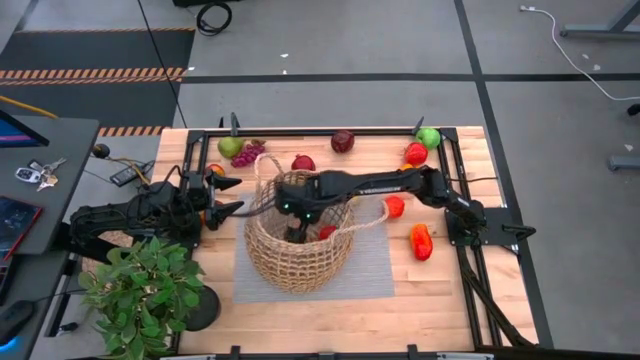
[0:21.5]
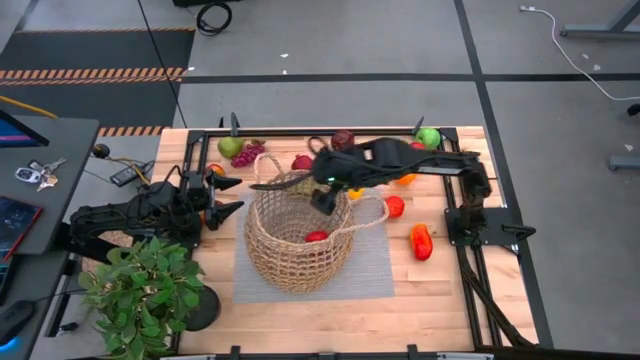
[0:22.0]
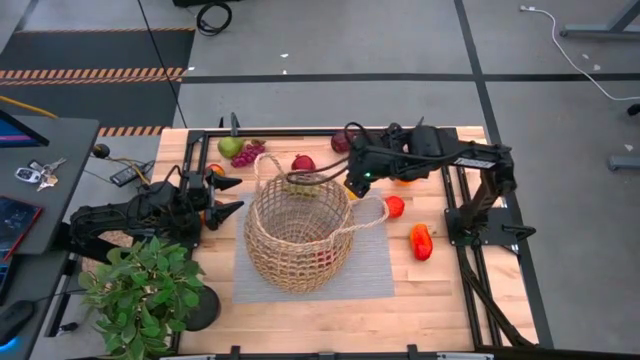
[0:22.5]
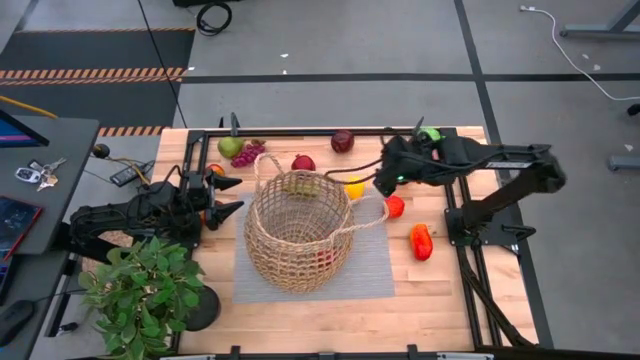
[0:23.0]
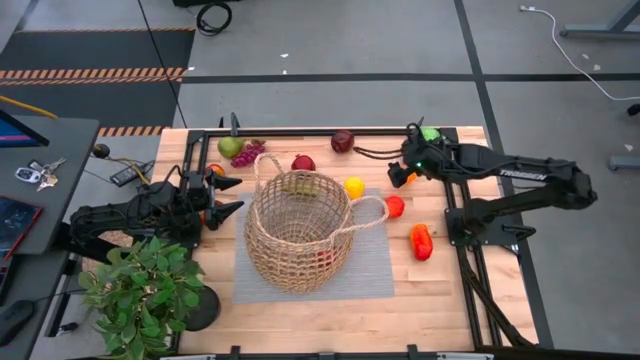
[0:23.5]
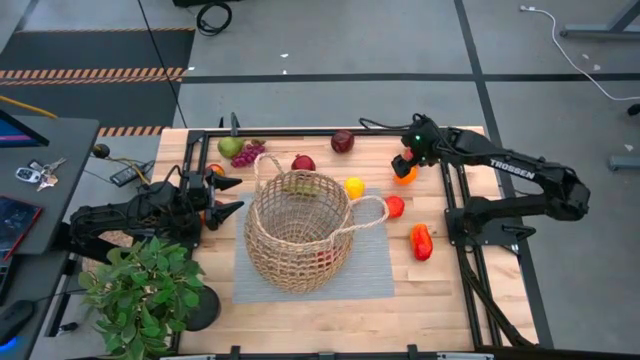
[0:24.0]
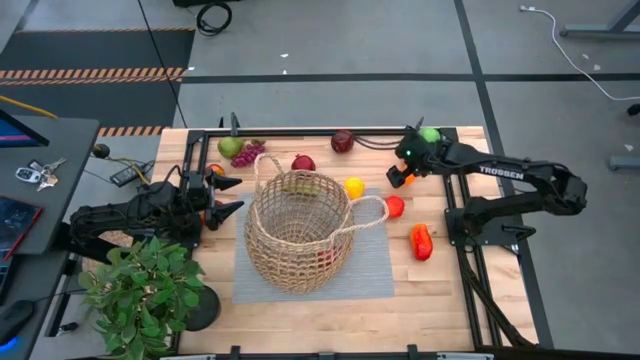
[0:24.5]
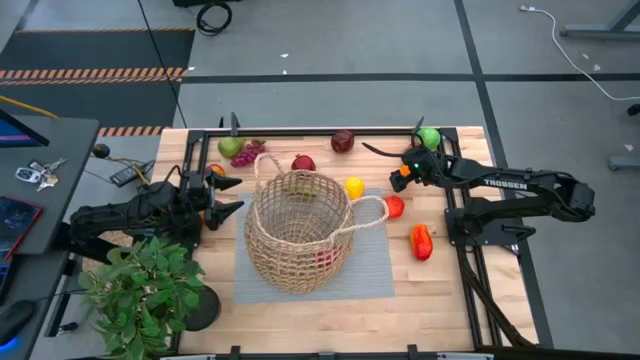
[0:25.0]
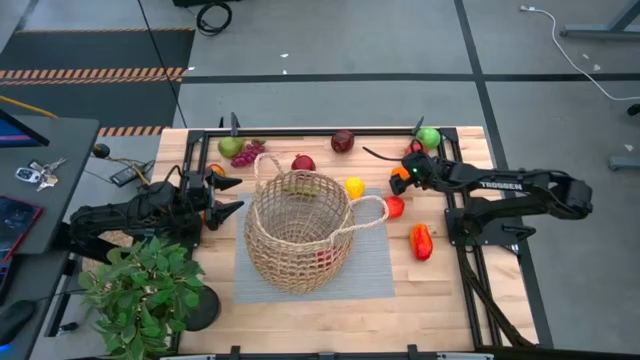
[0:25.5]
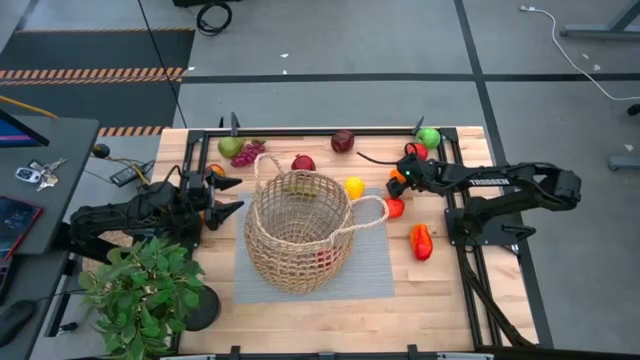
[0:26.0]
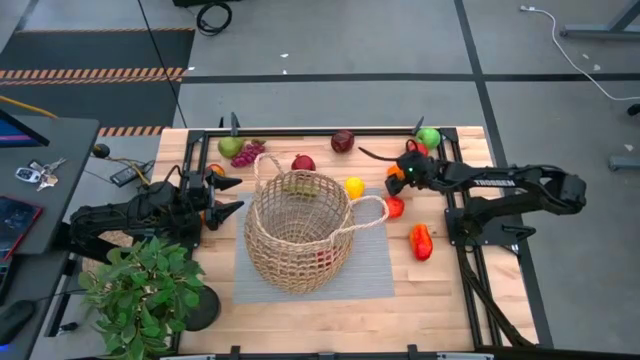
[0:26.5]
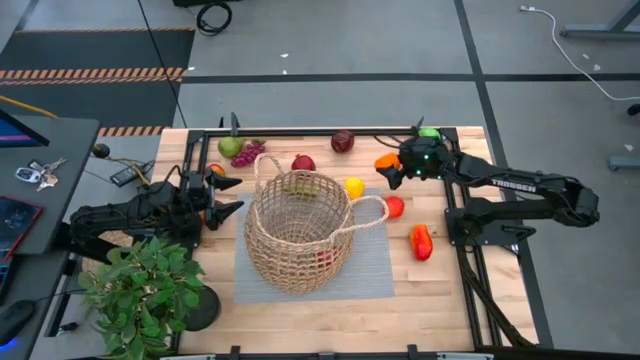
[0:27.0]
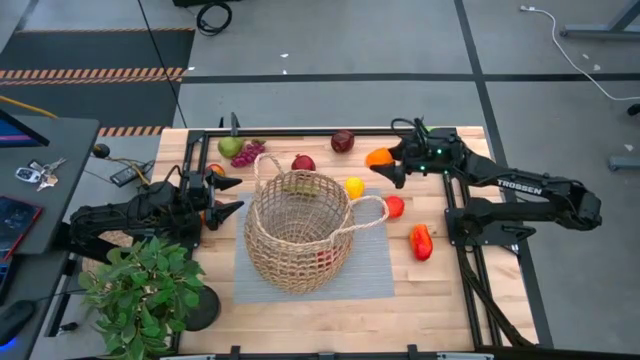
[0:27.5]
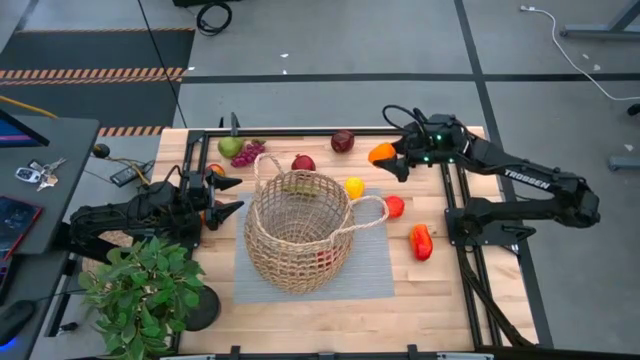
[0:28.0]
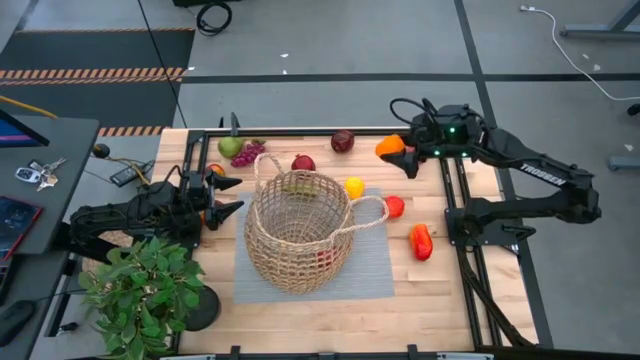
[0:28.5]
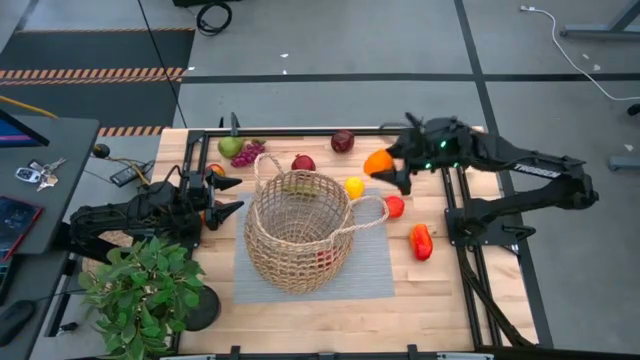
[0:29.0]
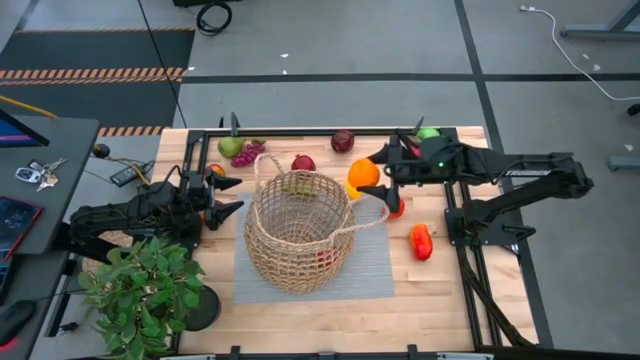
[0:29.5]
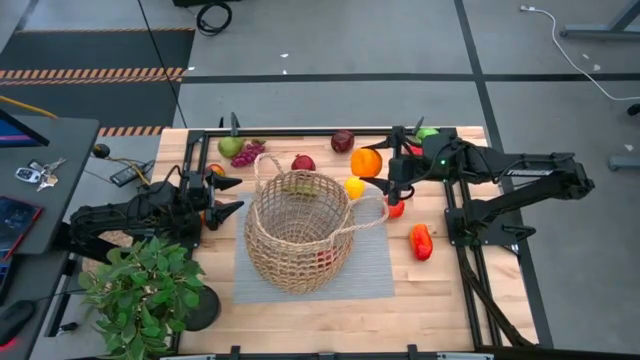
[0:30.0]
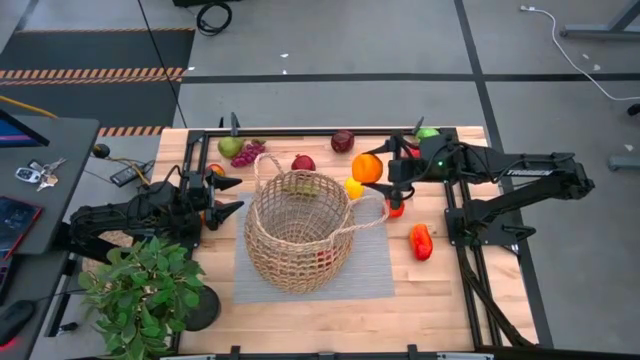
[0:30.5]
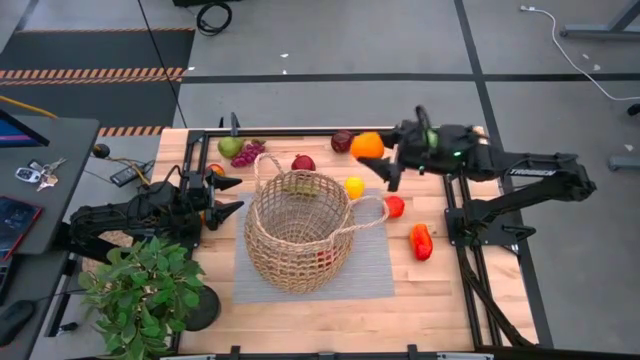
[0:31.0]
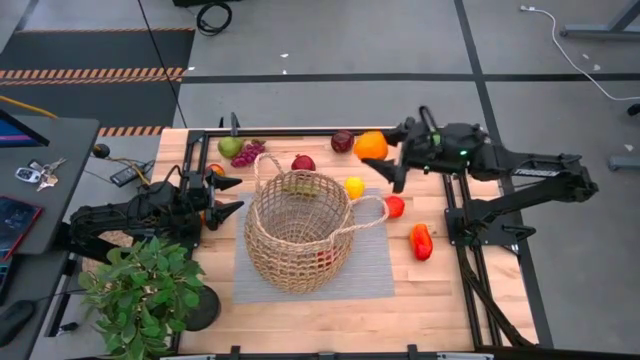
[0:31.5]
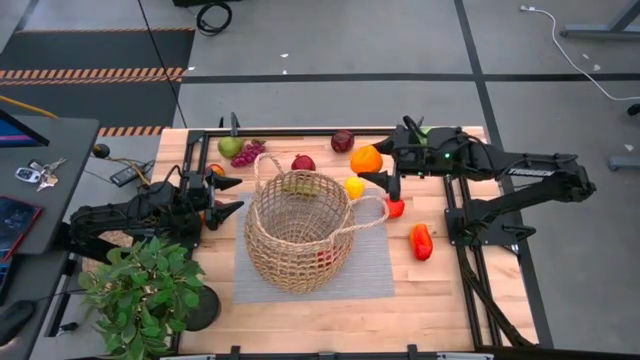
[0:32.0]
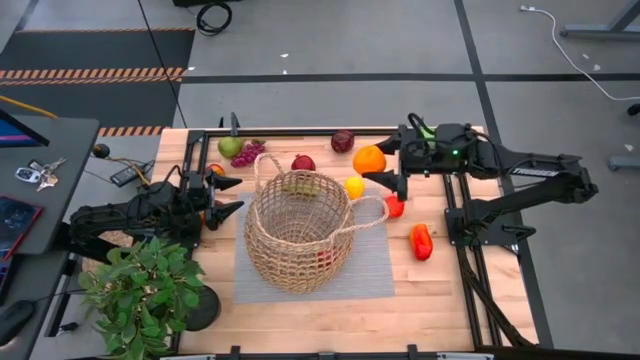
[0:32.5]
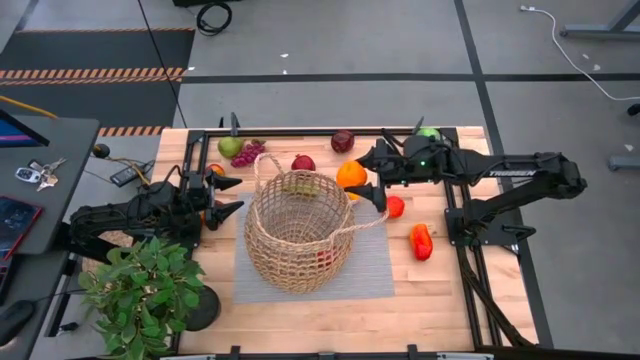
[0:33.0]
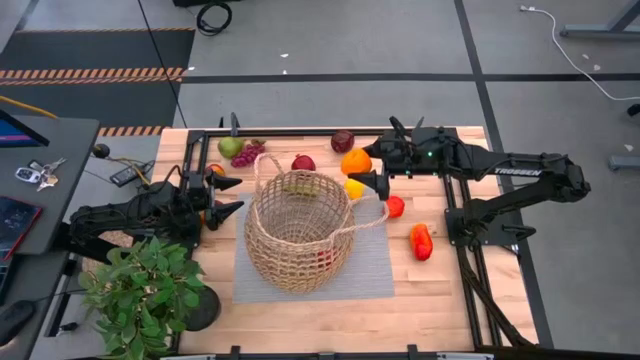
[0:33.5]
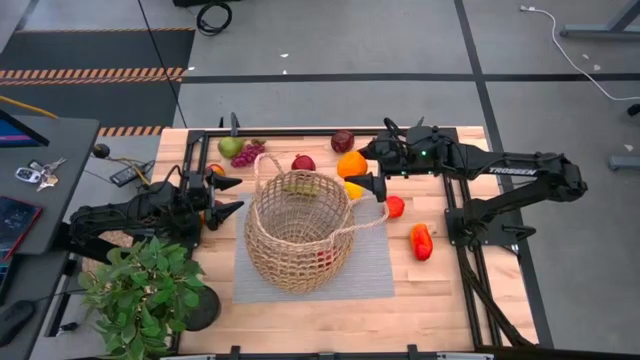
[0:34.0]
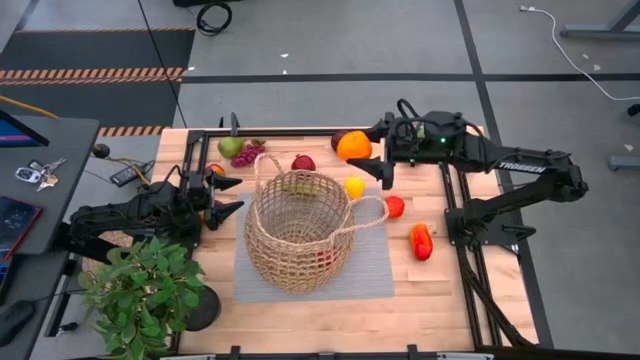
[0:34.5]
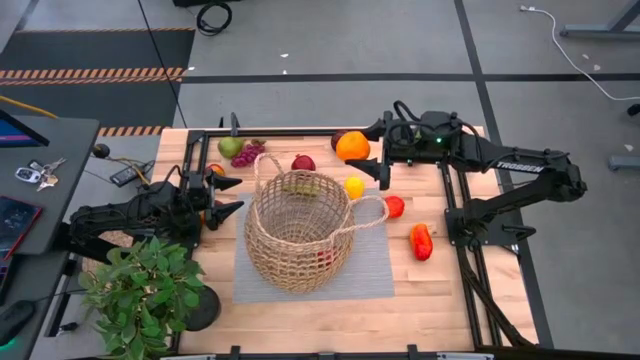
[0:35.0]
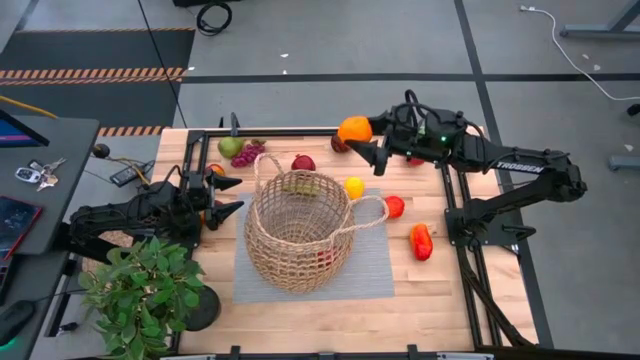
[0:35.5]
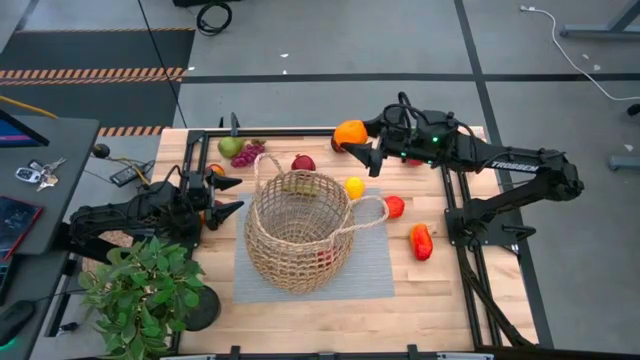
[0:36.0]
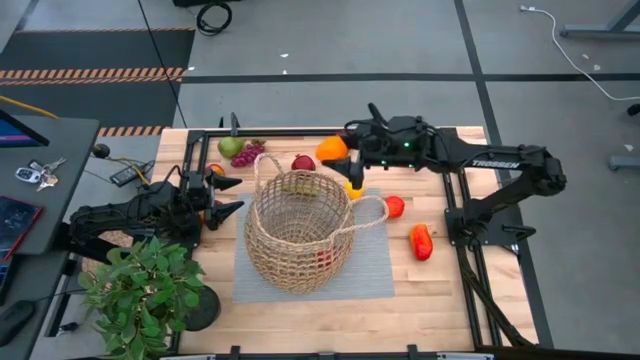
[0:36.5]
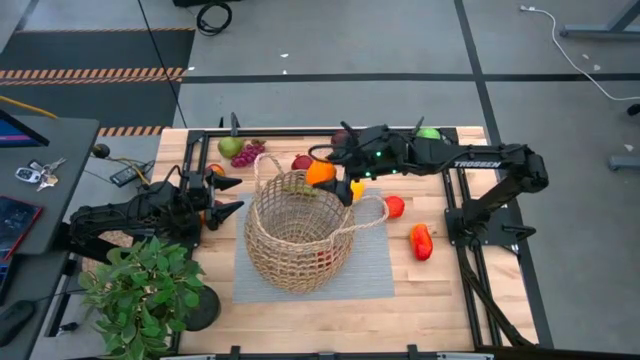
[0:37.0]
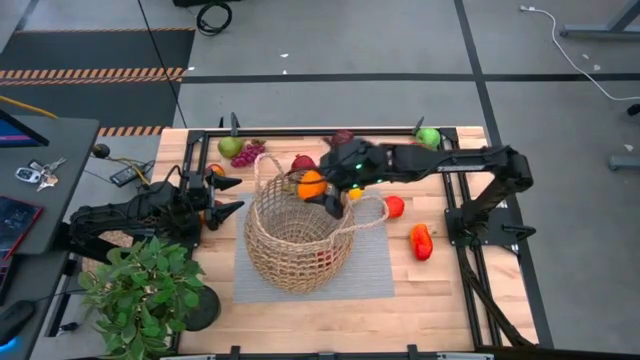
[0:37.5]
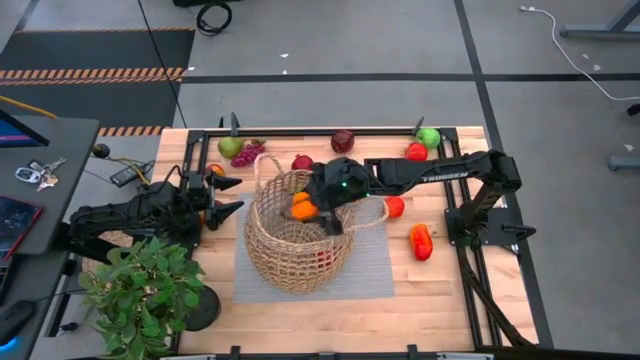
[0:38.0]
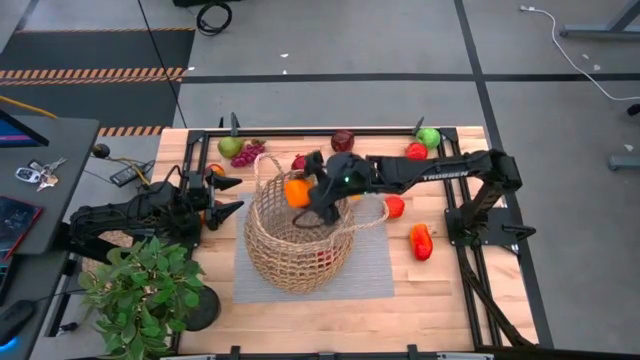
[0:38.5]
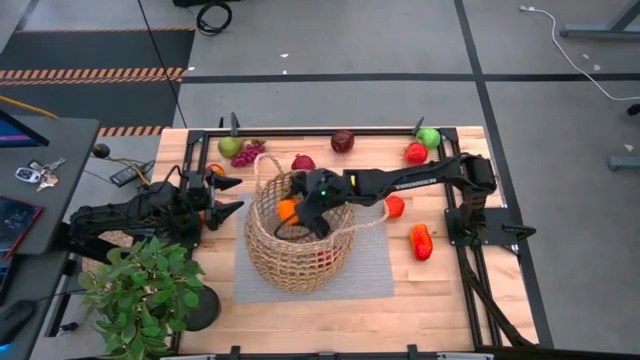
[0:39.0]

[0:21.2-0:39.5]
Task: Build produce basket
Put the orange into the brown woven basket
